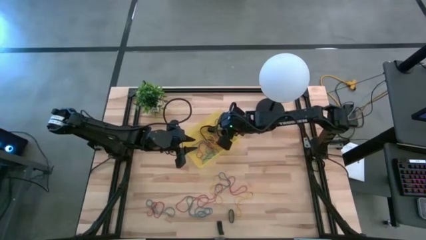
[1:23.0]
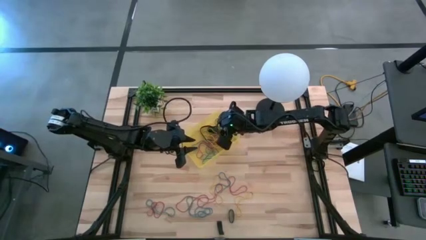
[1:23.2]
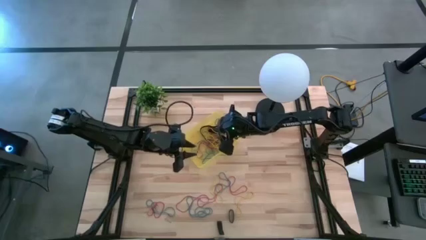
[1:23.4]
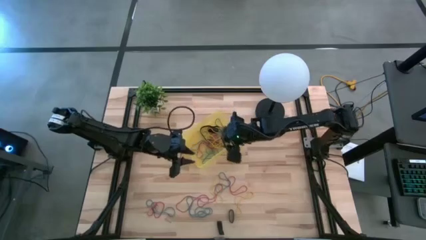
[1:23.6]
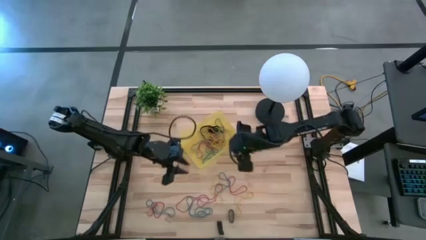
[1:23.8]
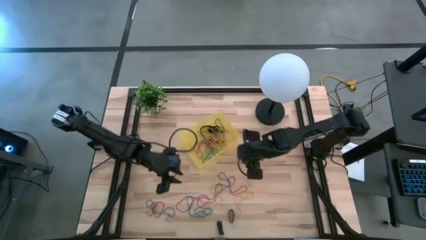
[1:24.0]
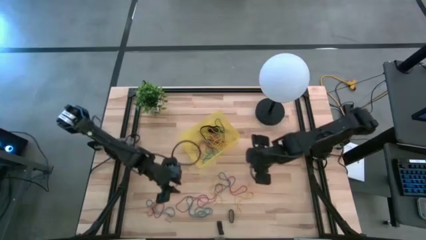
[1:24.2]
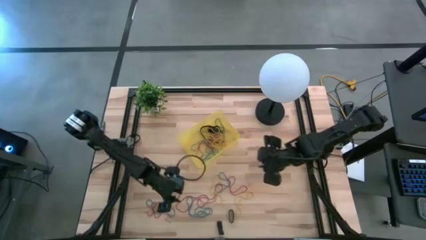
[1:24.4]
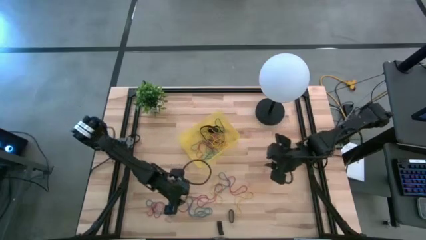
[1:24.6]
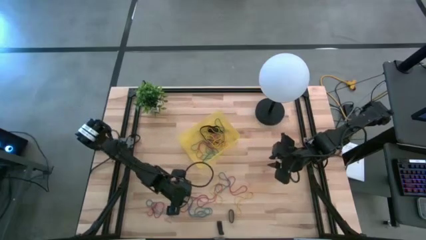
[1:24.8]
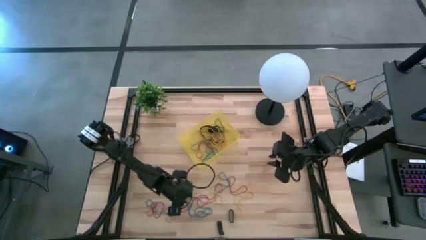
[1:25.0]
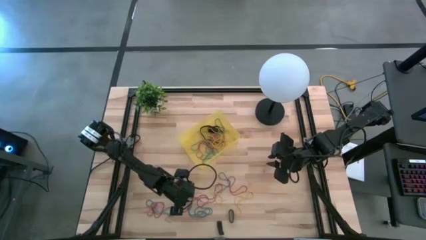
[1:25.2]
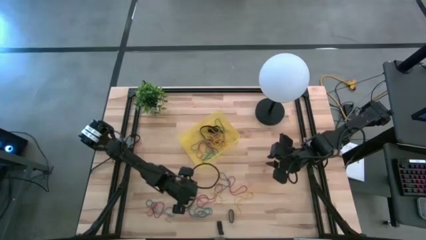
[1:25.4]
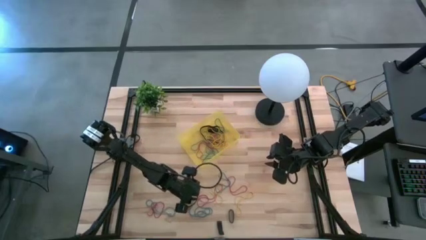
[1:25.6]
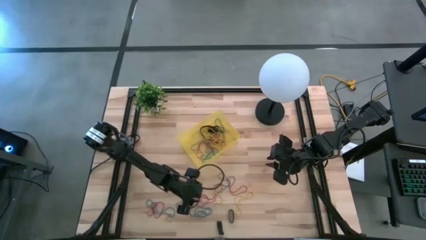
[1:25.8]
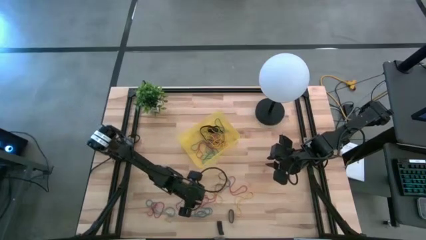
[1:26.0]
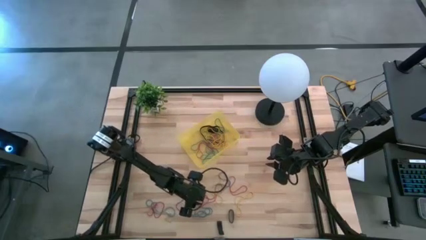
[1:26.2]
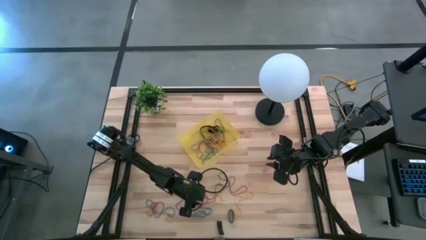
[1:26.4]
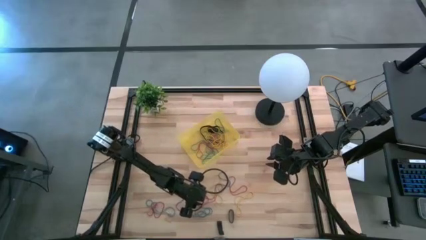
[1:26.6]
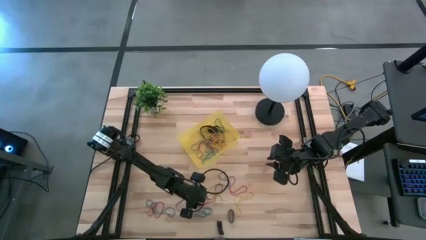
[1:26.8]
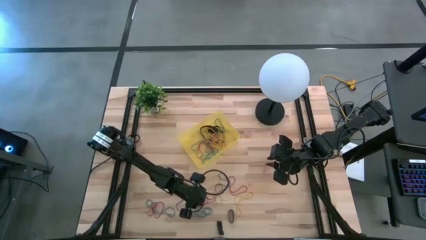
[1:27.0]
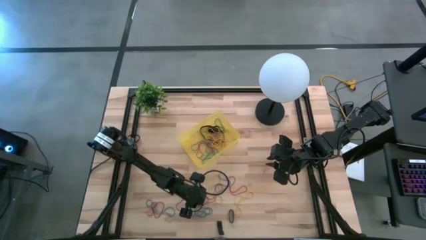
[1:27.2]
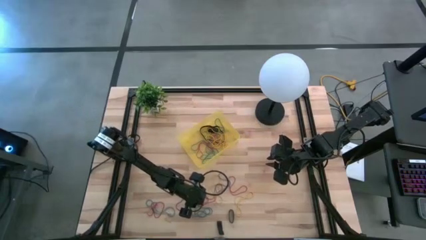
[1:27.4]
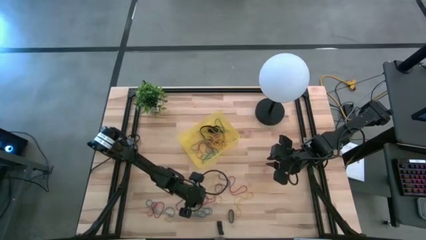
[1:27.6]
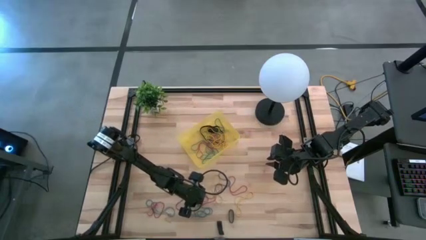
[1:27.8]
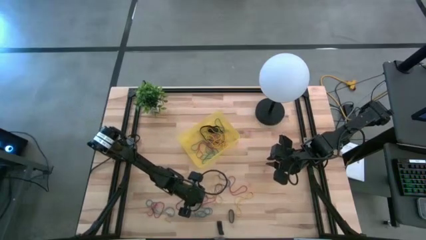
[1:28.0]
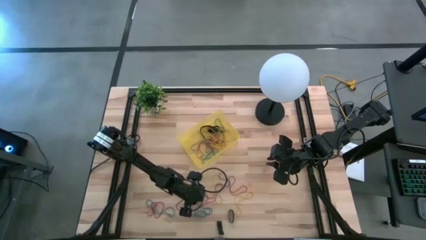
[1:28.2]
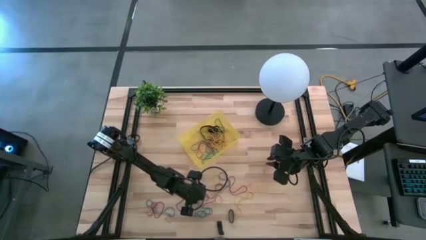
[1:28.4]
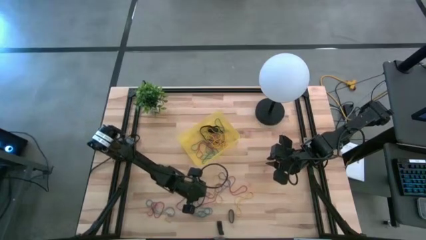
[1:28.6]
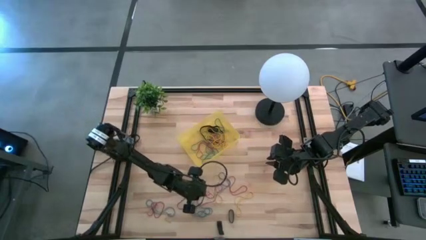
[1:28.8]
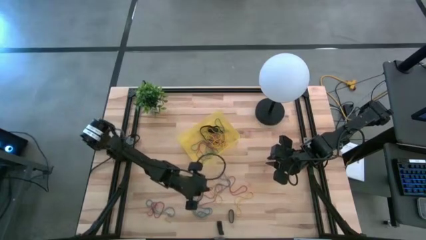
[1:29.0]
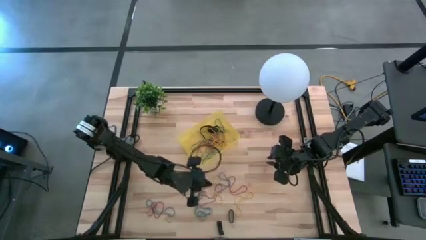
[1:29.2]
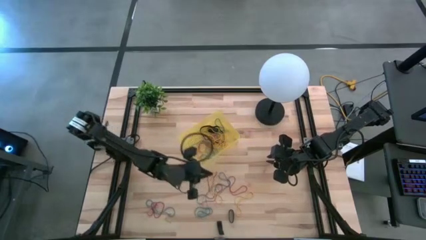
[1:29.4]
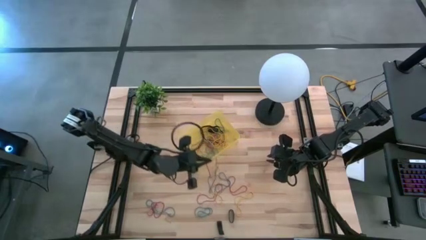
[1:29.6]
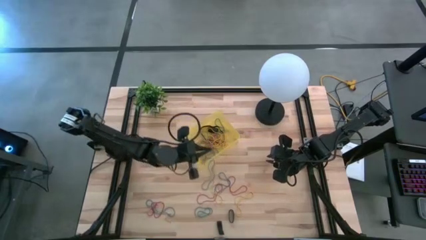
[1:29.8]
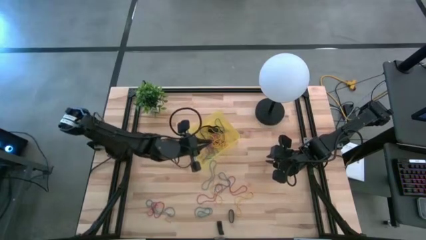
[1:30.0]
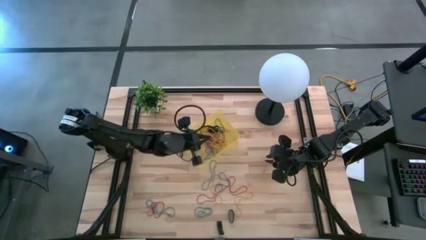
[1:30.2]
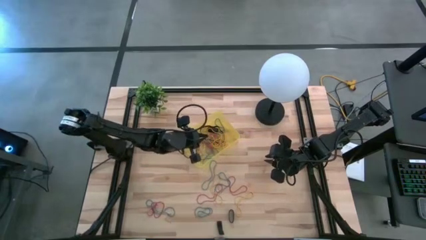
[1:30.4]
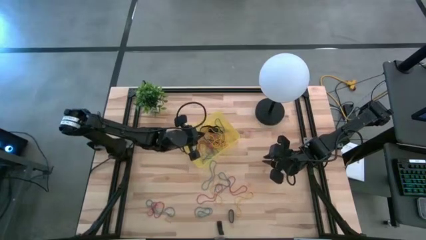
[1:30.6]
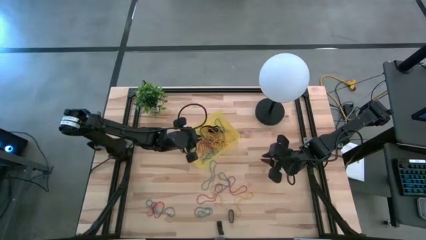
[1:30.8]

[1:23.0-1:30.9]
Task: Pick and place rubber bands into bin
Put the red rubber band into the yellow bin

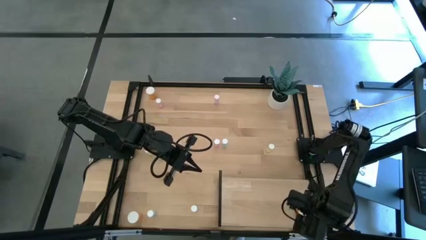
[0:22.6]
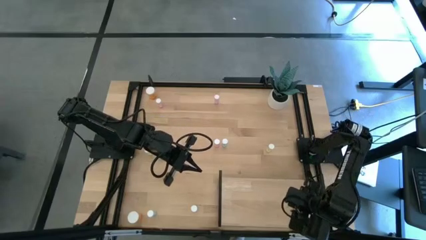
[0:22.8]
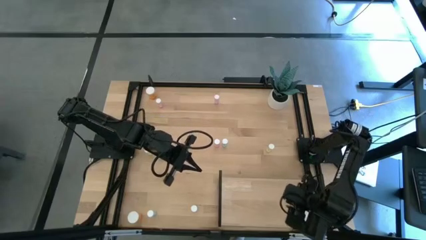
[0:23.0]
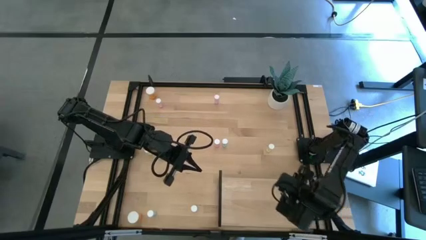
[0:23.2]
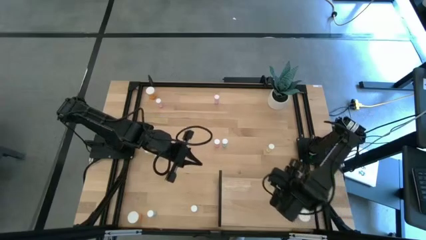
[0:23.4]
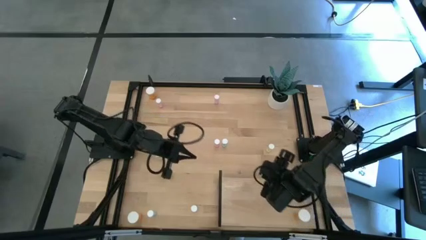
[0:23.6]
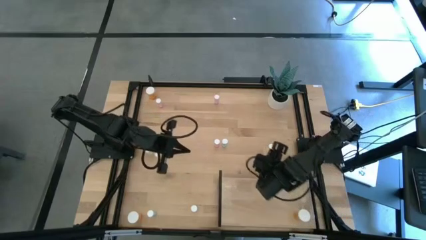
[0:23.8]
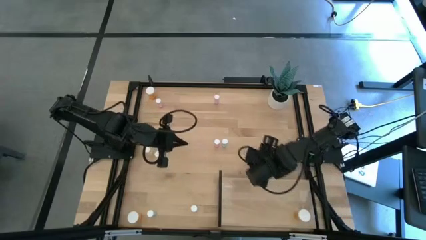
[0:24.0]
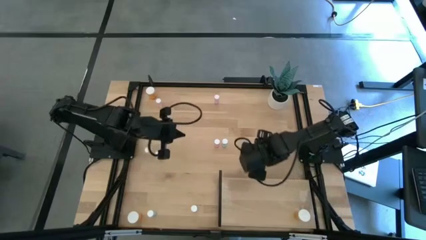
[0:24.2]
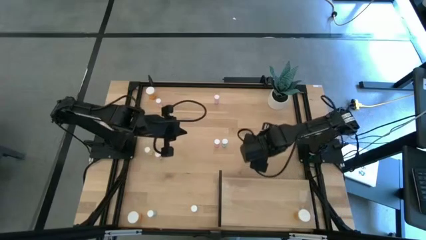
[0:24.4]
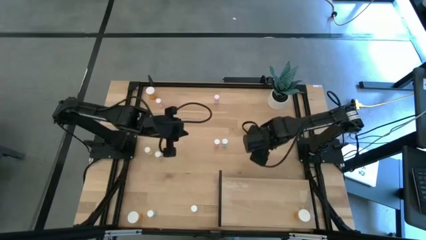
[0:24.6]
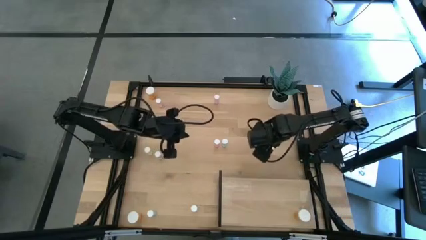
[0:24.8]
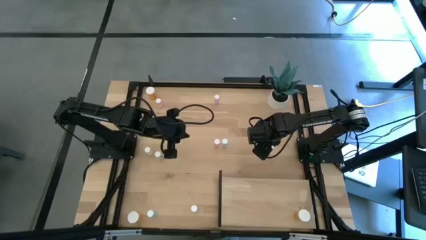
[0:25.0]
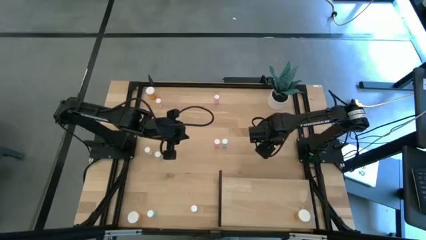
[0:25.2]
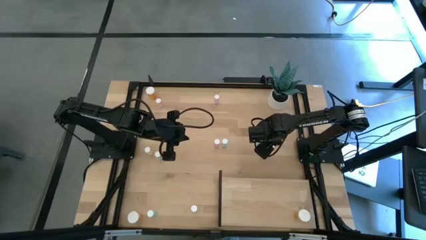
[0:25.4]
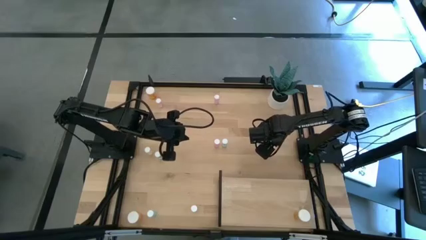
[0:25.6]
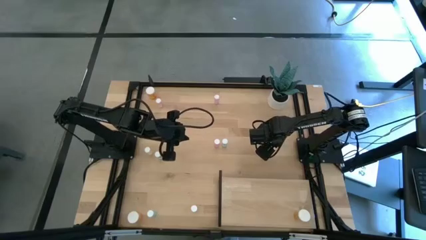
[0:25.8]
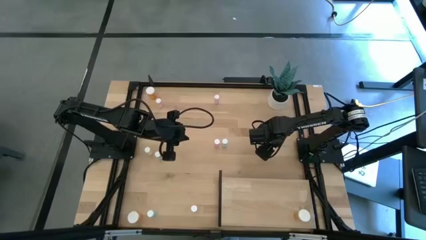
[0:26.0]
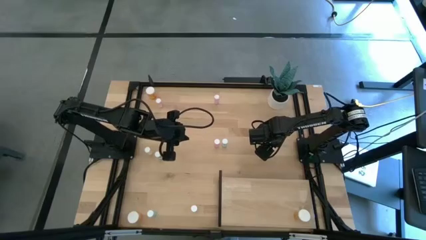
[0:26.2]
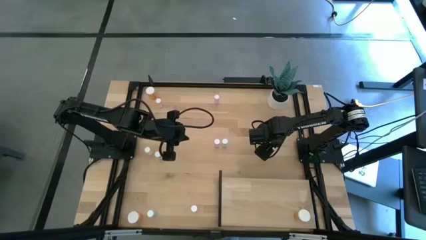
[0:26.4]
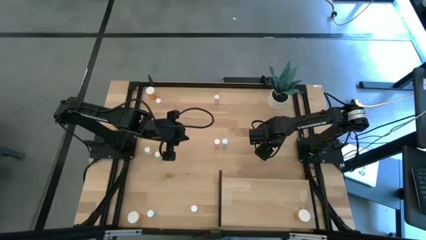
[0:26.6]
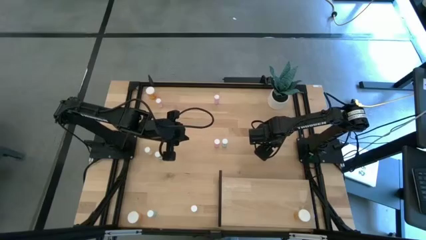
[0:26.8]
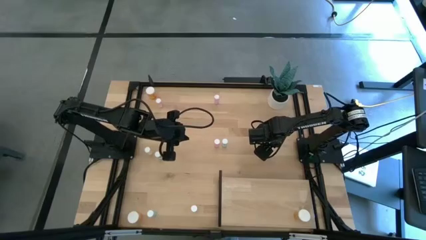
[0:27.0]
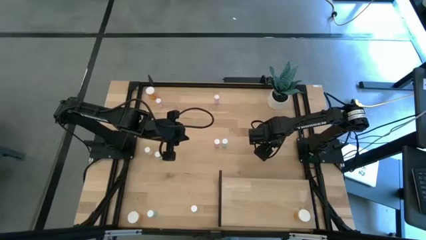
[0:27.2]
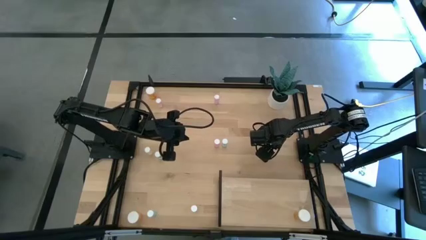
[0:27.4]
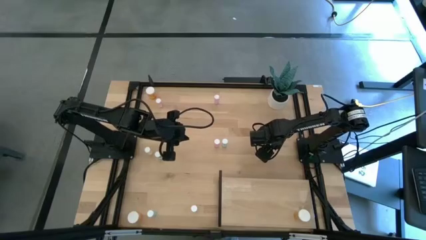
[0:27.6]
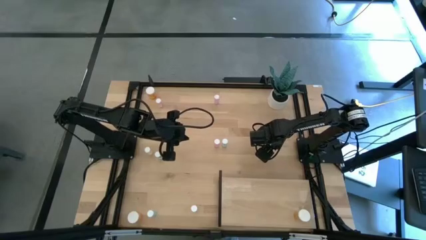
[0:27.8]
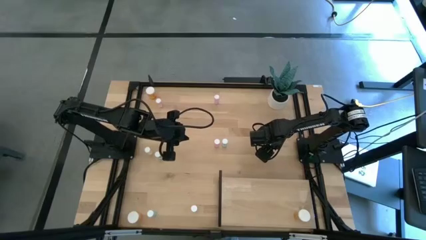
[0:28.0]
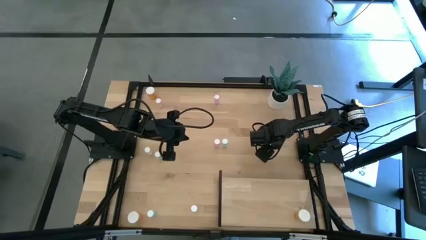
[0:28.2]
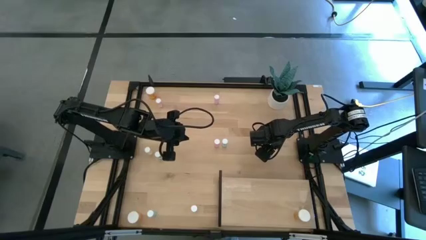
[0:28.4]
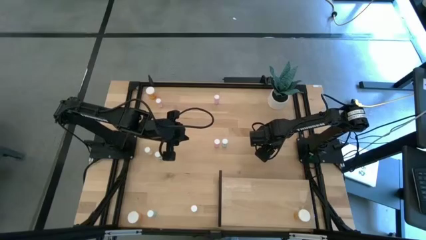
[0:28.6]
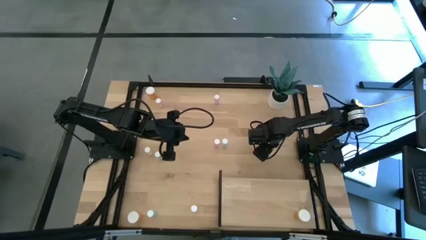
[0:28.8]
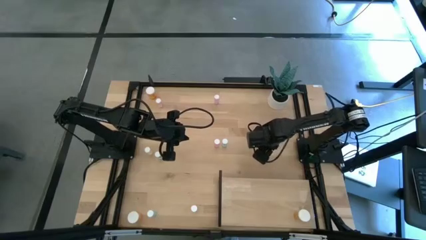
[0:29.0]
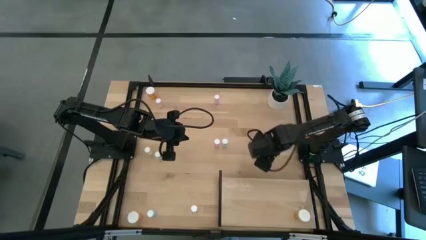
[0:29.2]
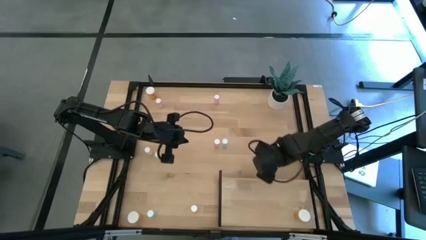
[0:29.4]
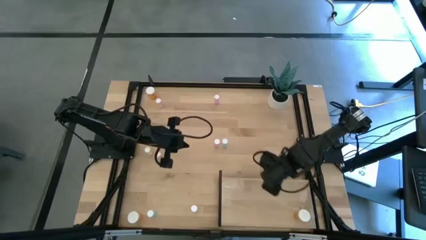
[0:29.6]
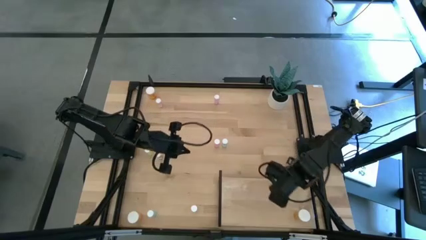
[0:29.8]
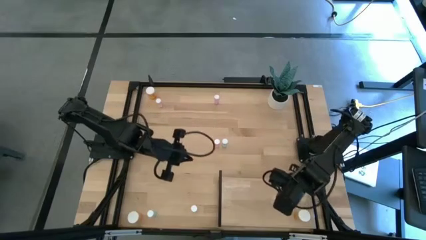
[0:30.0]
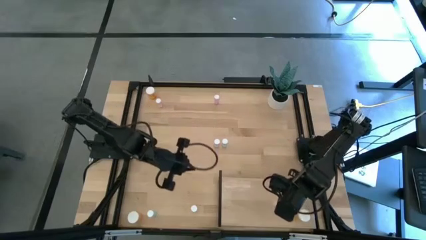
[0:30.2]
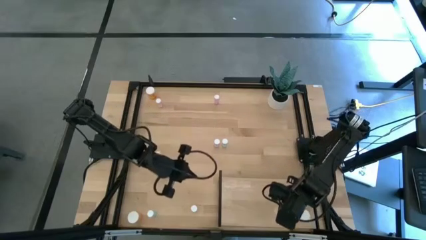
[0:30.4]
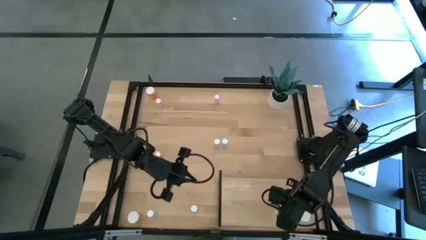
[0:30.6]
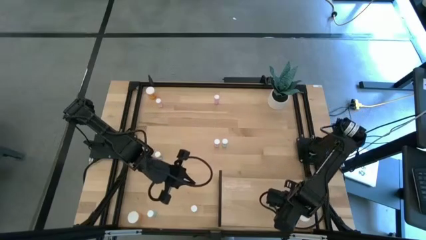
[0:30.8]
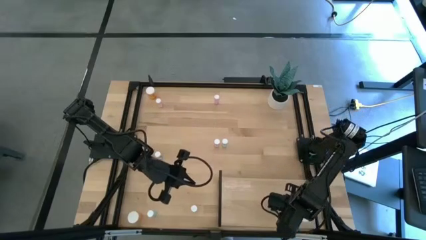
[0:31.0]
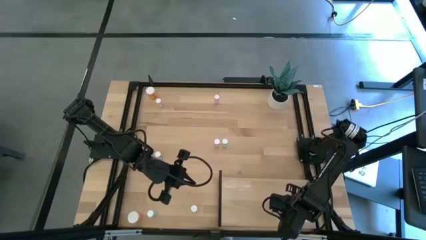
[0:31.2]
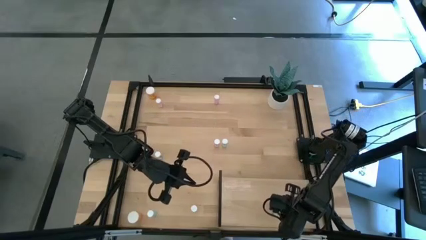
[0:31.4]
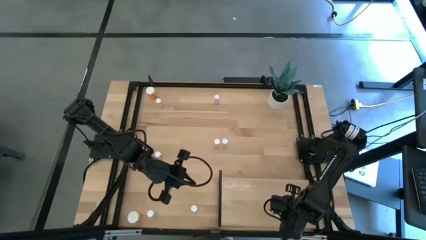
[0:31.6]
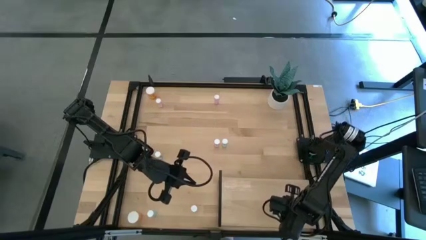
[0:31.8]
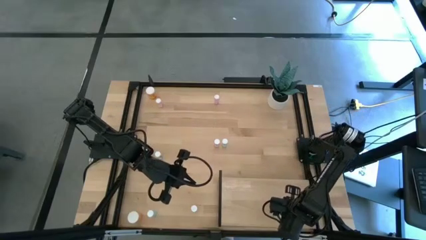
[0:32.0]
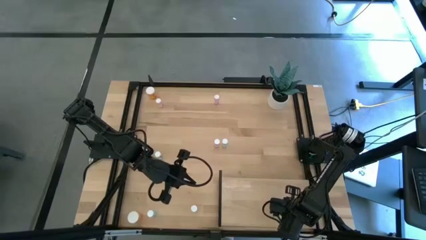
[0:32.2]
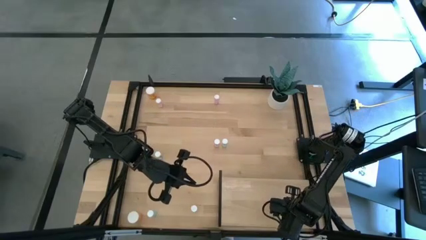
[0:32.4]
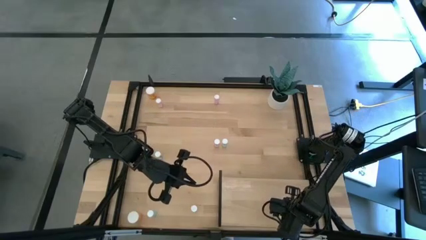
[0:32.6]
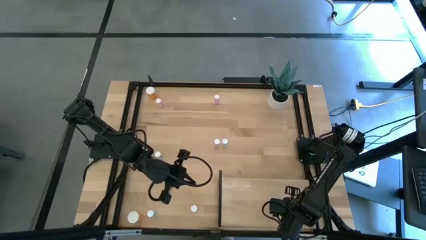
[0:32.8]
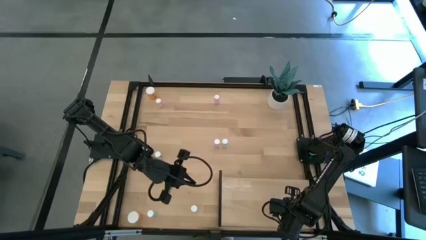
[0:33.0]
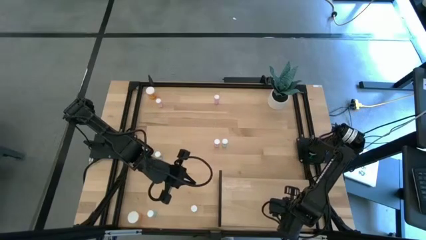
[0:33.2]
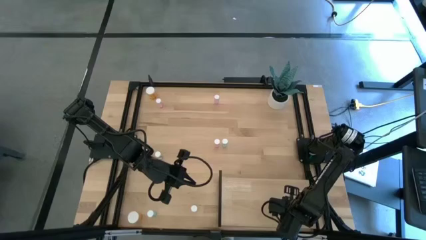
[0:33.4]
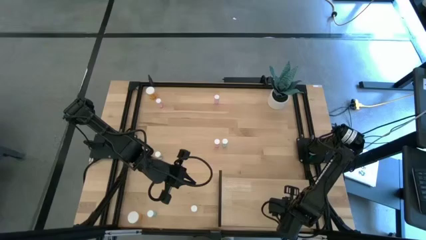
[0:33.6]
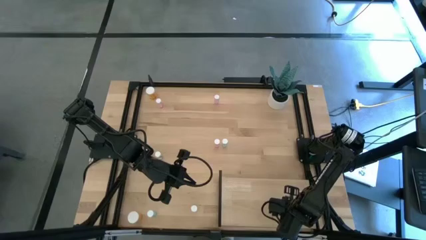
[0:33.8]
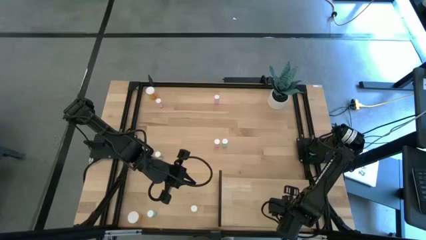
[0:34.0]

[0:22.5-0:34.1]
Task: Pick and place medicine bottles onto shelf by color
Put the middle right yellow pill bottle on the shelf
